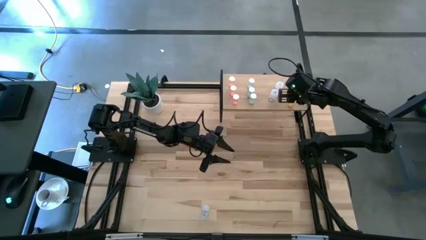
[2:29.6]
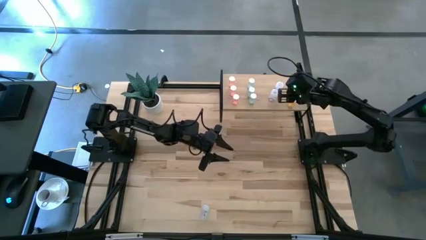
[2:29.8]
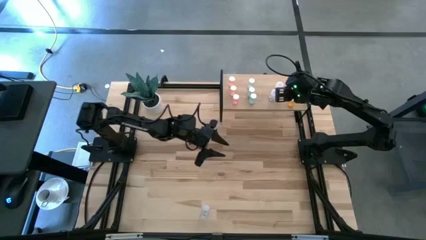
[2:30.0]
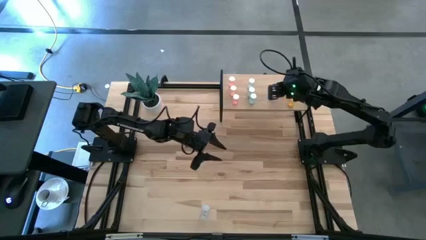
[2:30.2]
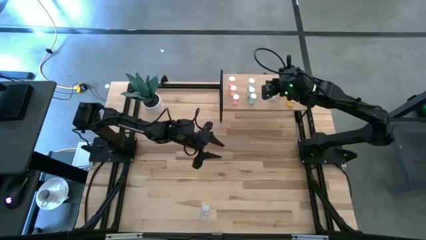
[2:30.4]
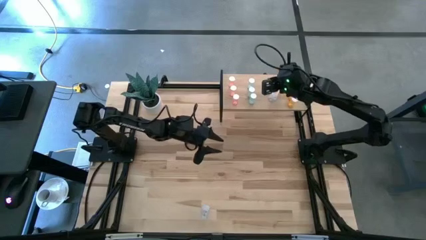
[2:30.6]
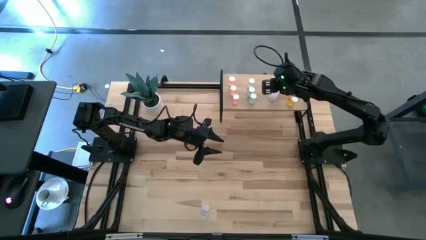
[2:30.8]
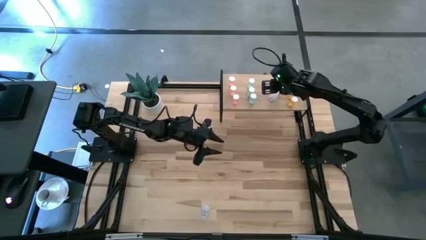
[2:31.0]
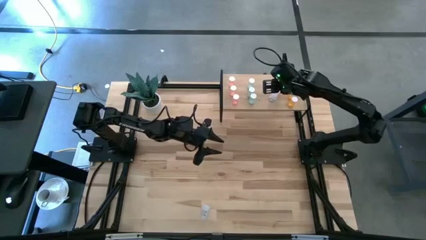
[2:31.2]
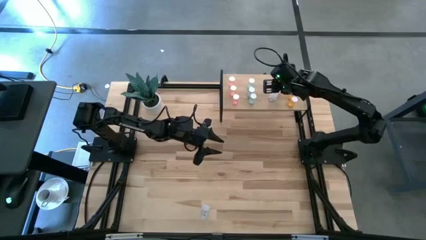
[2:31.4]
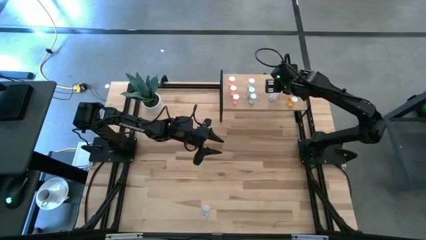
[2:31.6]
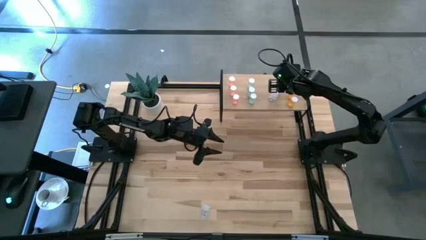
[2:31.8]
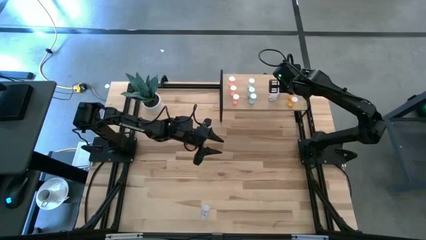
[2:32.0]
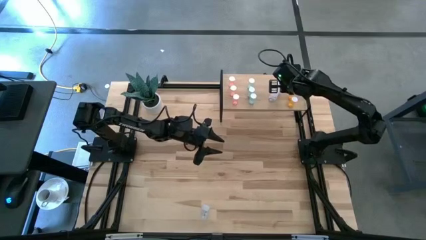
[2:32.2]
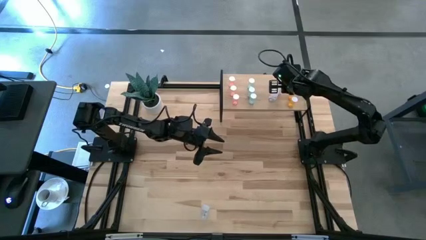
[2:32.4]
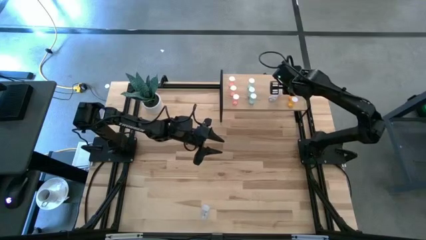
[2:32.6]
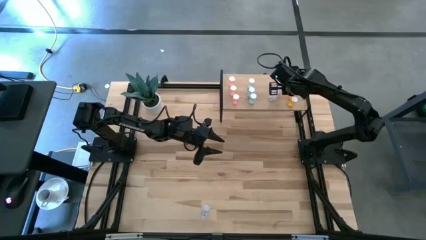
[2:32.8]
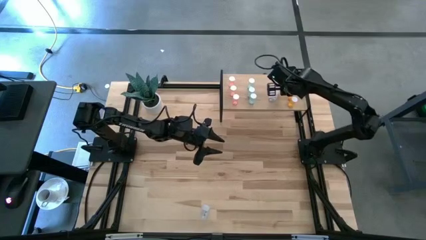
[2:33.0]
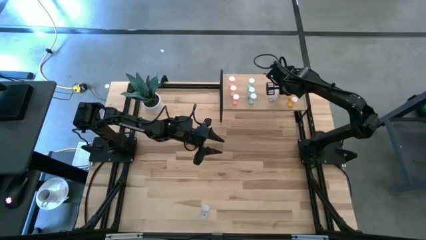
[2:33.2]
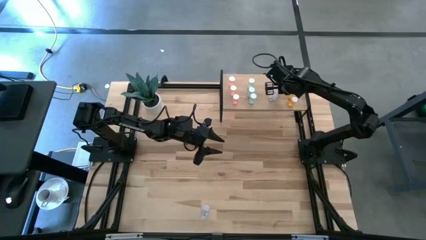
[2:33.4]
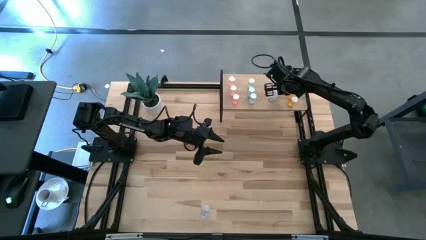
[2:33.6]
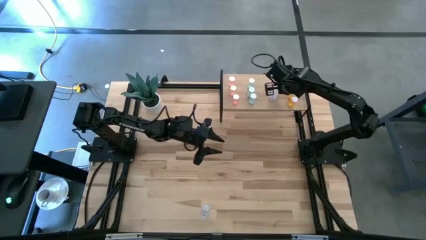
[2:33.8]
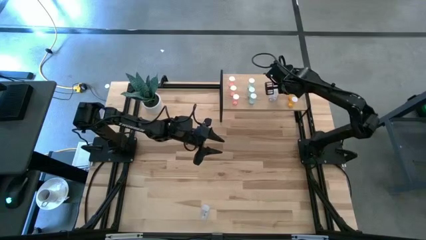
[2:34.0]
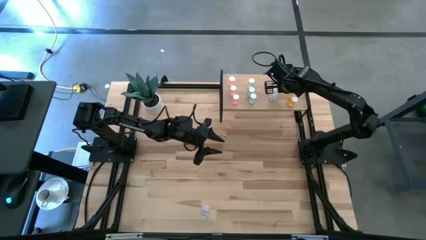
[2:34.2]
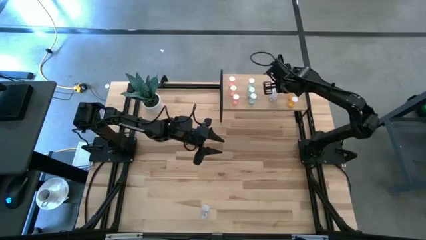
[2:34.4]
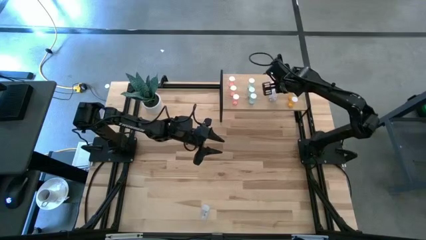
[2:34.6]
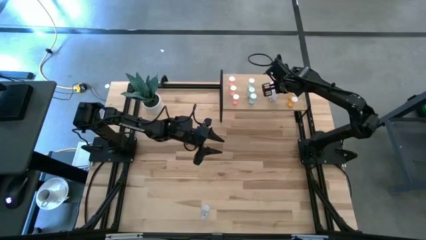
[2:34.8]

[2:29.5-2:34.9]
Task: Pick and place medicine bottles onto shelf by color
Adjust the transparent pill bottle on the shelf

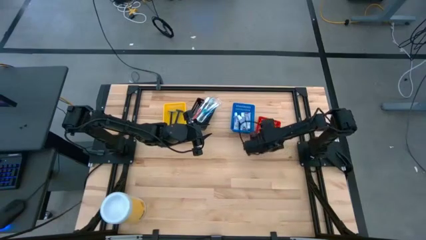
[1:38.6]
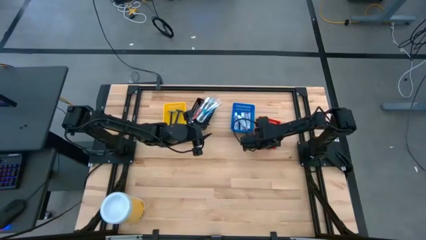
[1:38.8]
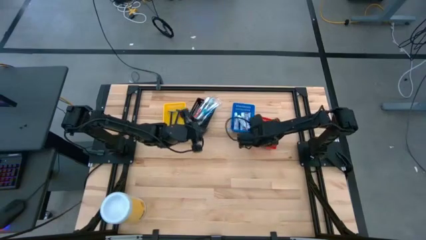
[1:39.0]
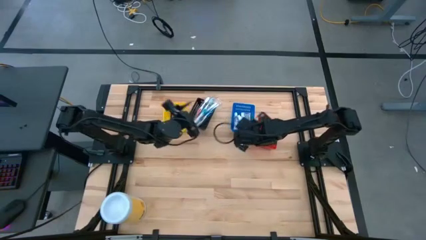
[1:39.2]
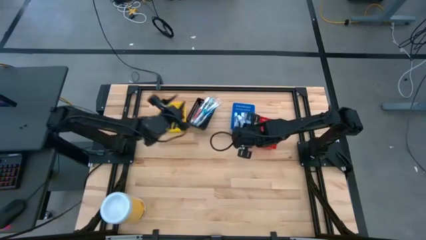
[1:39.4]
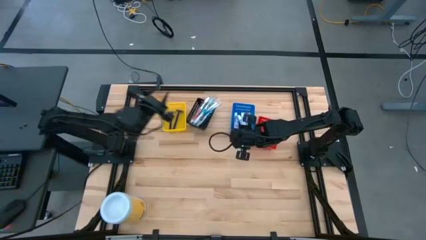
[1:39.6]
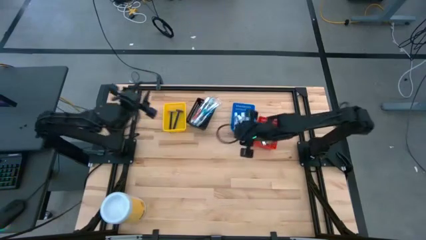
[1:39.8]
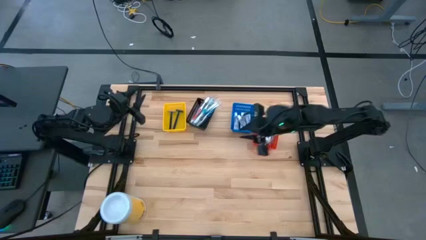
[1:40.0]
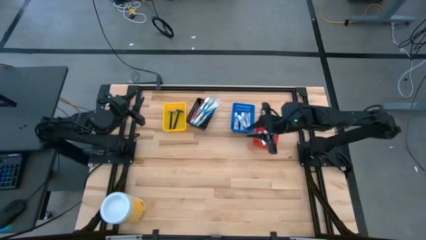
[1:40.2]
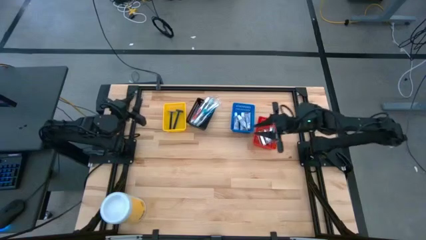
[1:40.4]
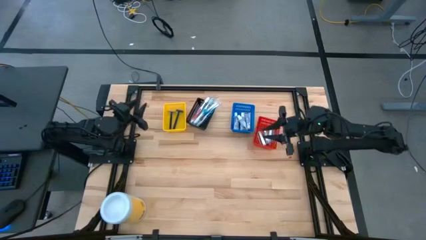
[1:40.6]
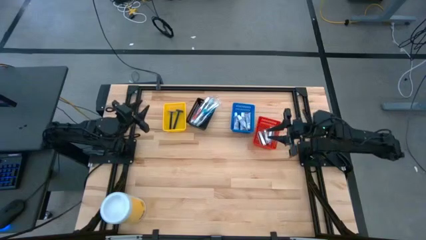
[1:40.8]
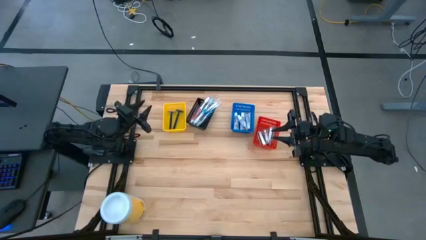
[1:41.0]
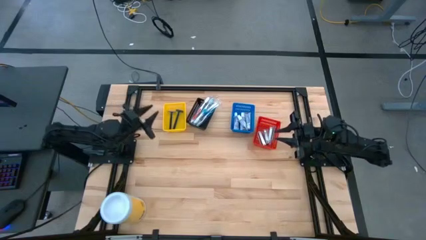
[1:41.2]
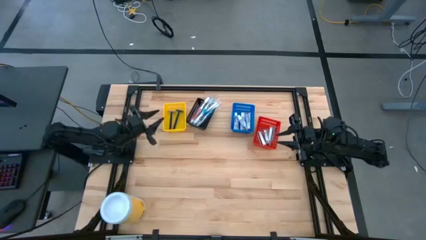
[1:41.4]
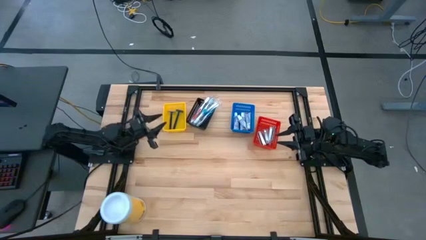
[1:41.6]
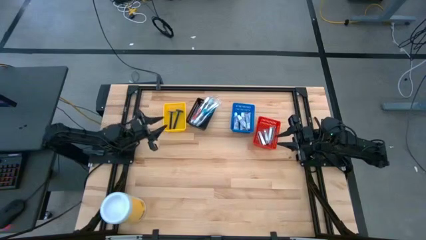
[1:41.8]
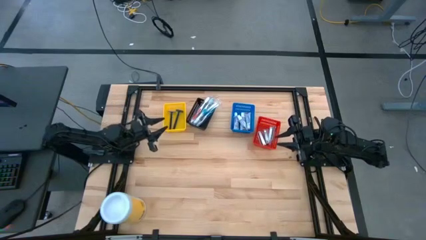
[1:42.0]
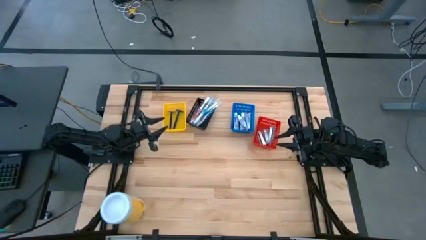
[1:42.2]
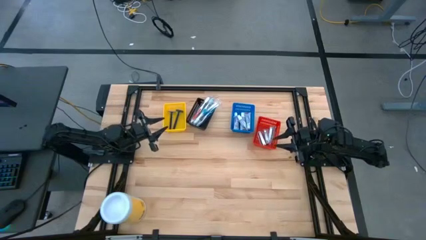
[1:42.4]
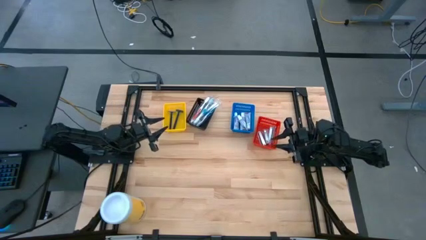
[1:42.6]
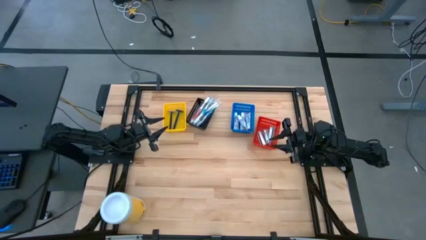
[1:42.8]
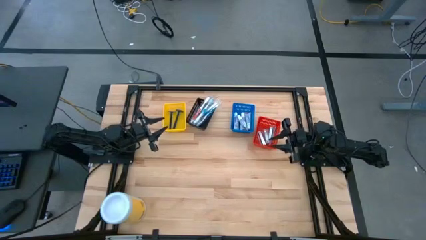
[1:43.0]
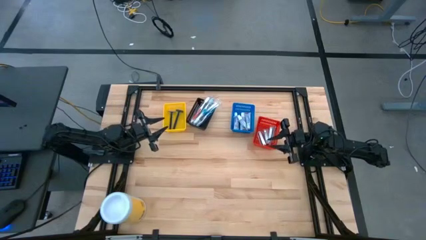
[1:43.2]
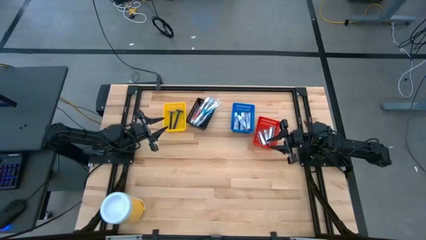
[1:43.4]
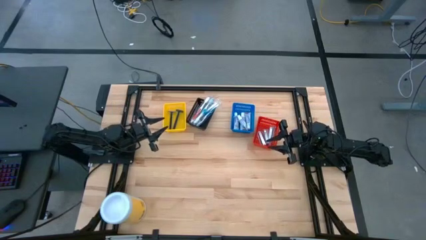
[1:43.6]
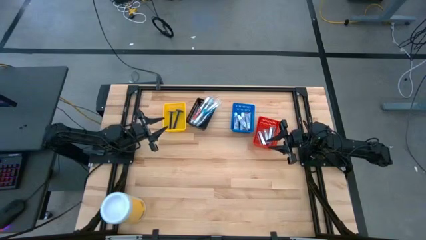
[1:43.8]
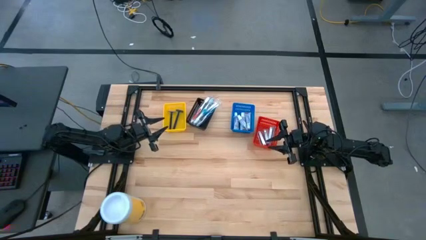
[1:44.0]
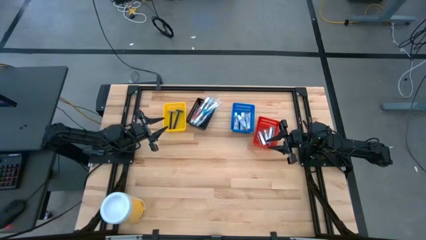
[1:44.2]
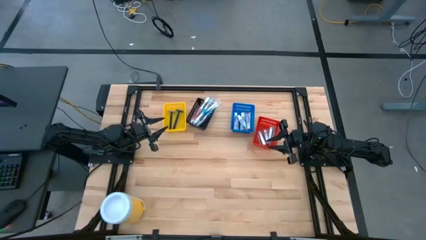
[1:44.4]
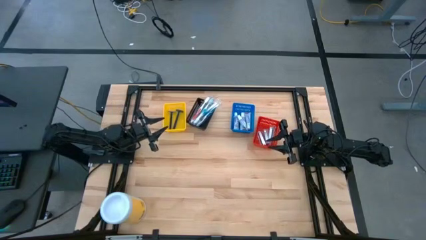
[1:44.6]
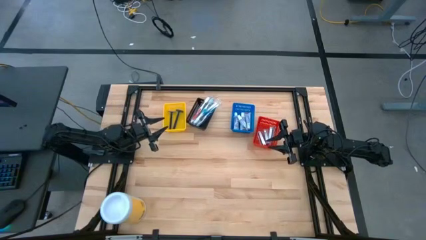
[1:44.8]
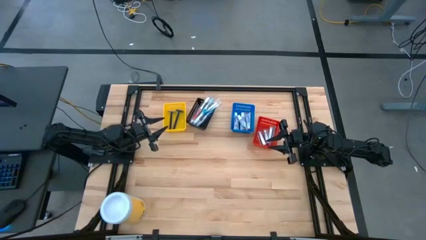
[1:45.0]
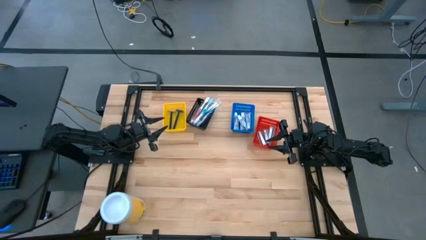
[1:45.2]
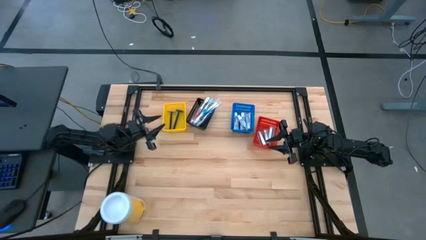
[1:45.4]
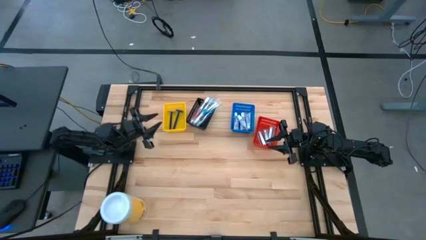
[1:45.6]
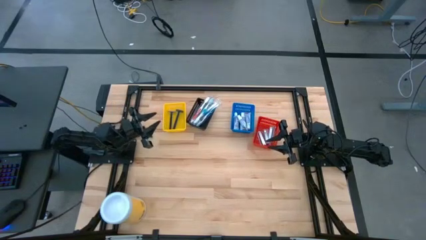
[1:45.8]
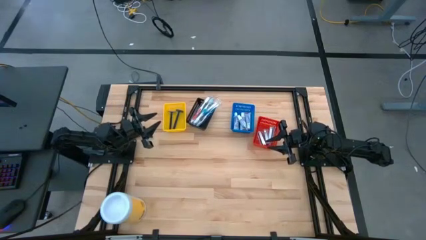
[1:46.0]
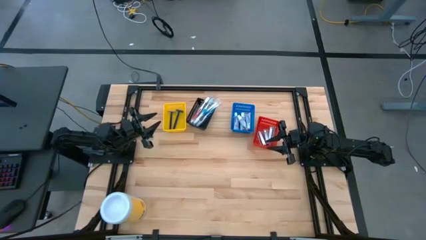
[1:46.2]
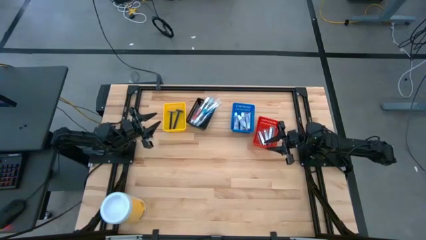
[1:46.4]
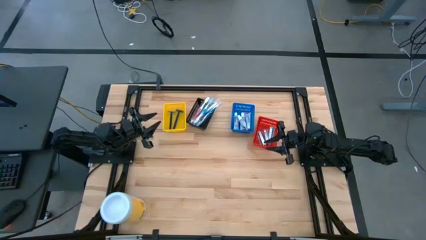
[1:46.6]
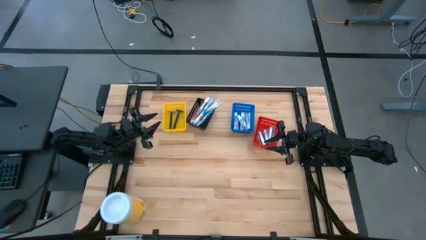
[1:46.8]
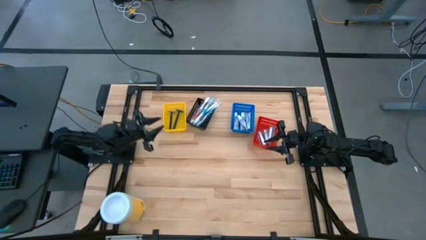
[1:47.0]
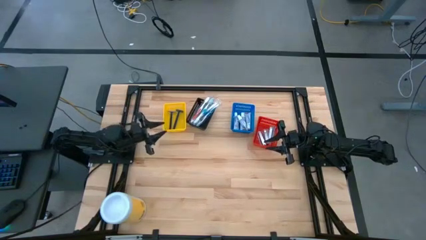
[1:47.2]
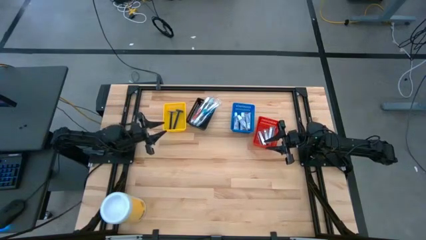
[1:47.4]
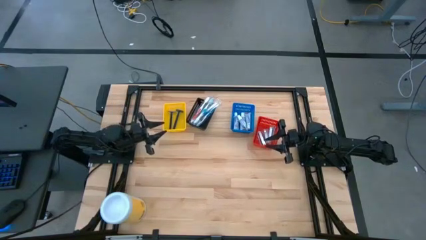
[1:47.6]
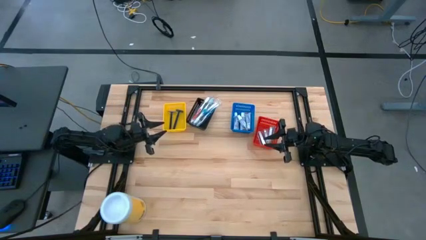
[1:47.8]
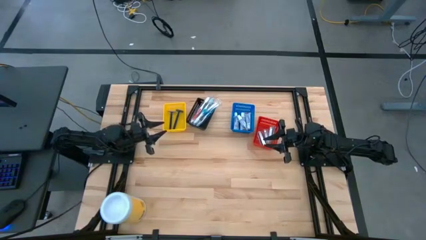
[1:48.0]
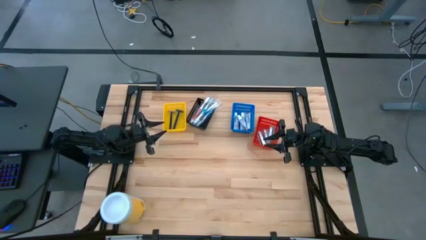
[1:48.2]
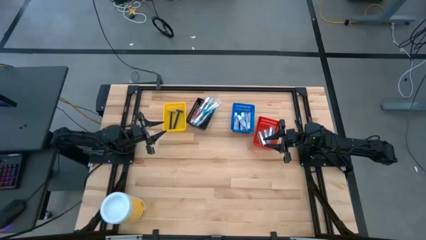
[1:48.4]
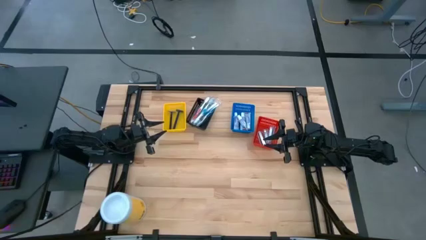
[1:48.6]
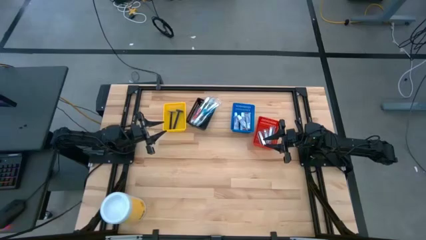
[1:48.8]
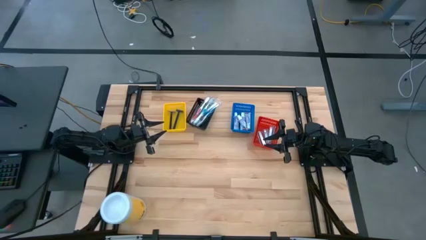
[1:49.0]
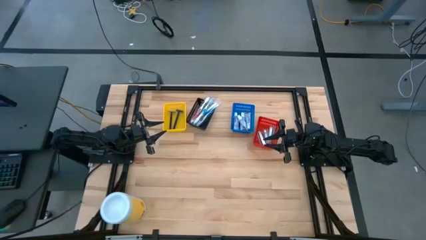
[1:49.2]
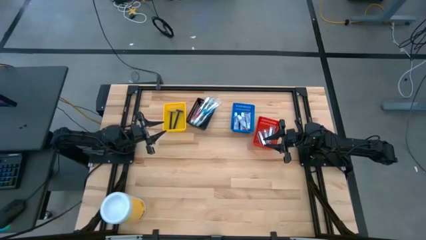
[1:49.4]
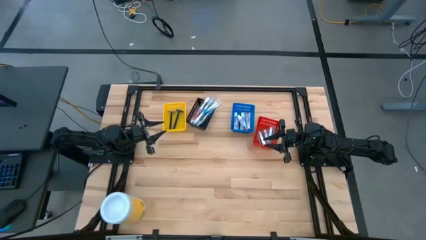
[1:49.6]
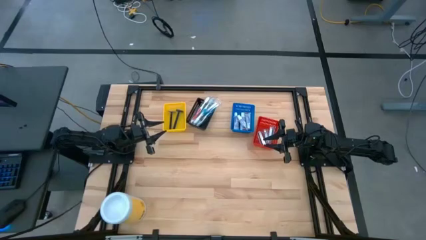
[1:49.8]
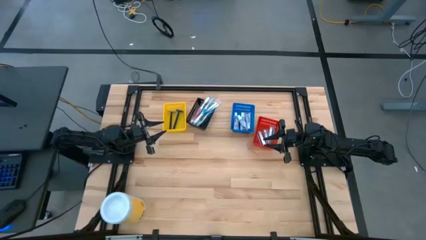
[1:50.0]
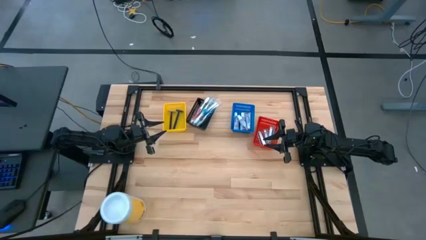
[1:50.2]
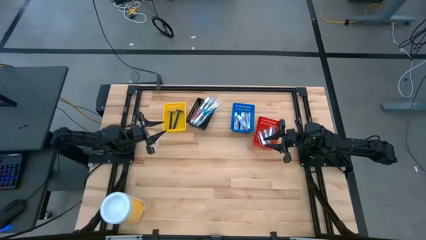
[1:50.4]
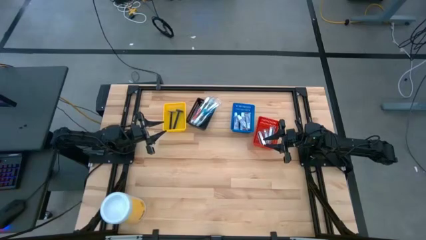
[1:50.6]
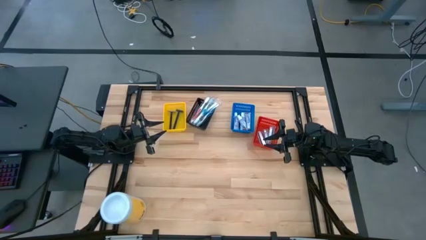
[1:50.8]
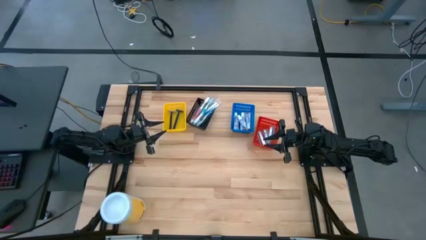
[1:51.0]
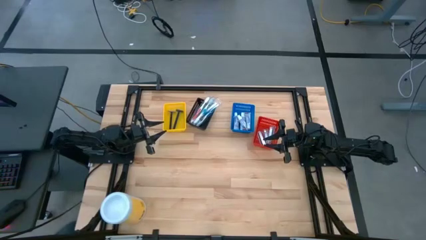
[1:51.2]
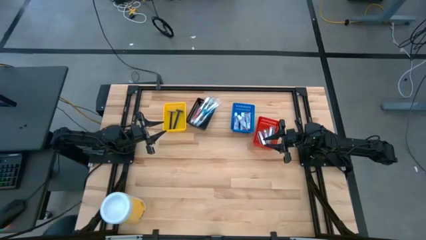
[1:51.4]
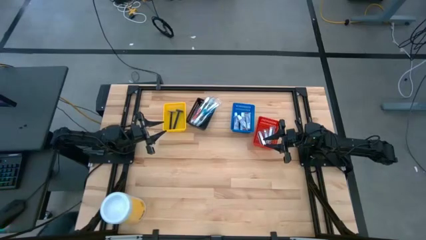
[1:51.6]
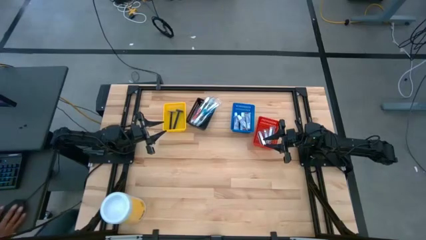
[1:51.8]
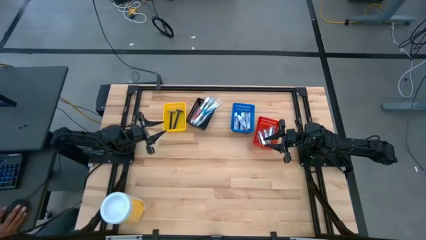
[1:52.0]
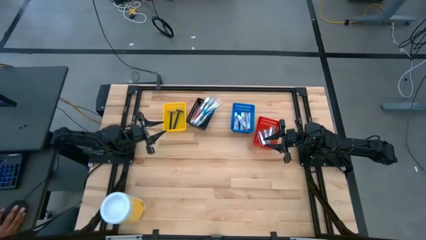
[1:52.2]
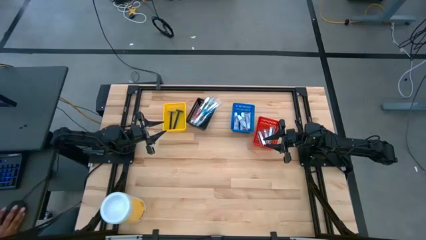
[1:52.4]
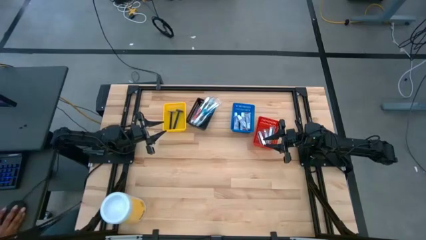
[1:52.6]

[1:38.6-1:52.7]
Task: Pick & Place Travel size toiletries
Return to Home Position
